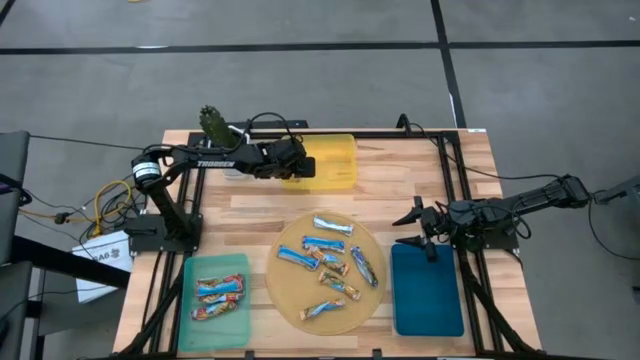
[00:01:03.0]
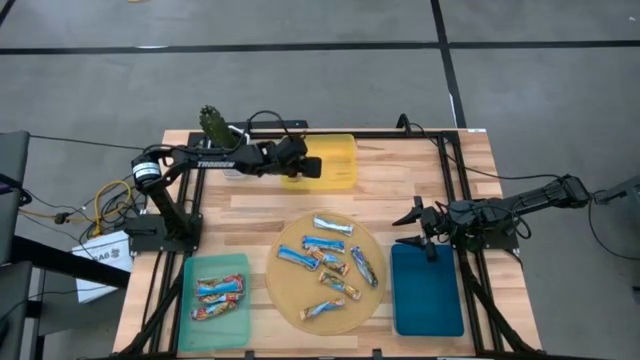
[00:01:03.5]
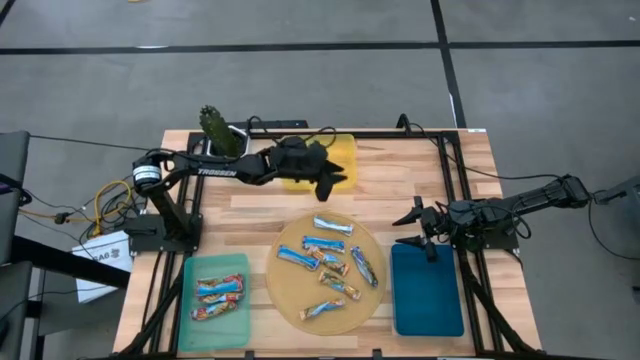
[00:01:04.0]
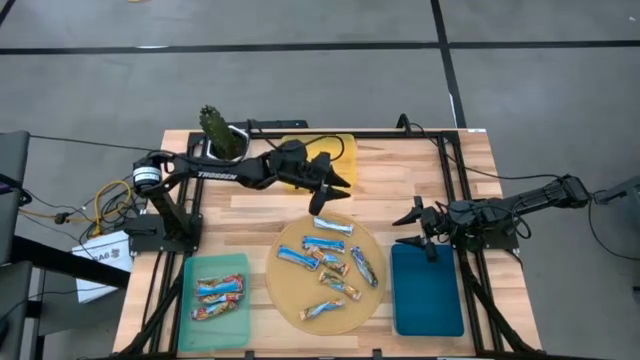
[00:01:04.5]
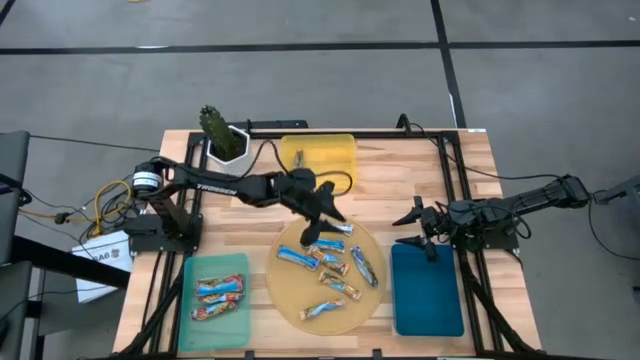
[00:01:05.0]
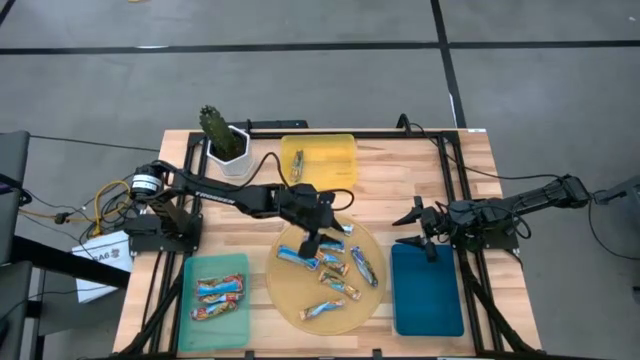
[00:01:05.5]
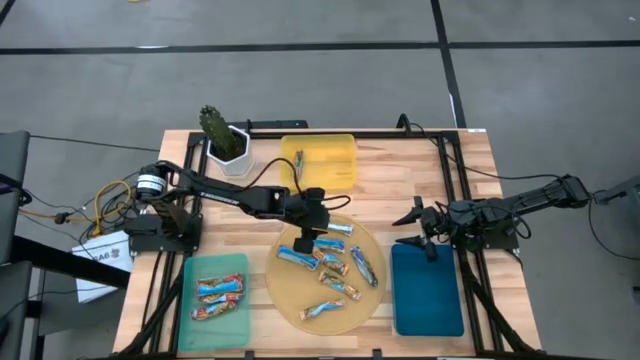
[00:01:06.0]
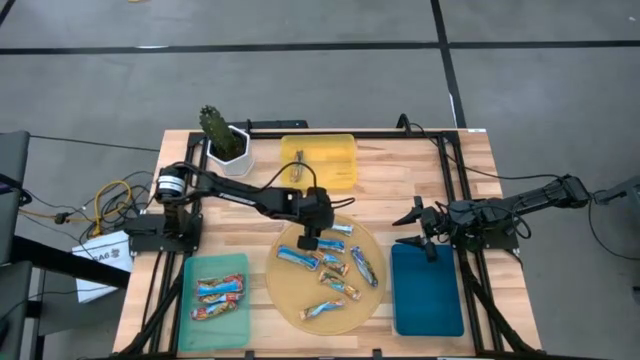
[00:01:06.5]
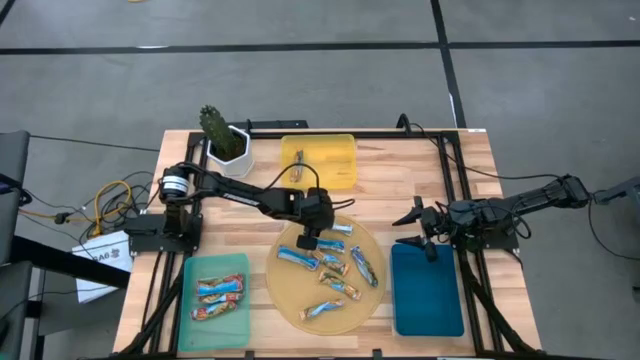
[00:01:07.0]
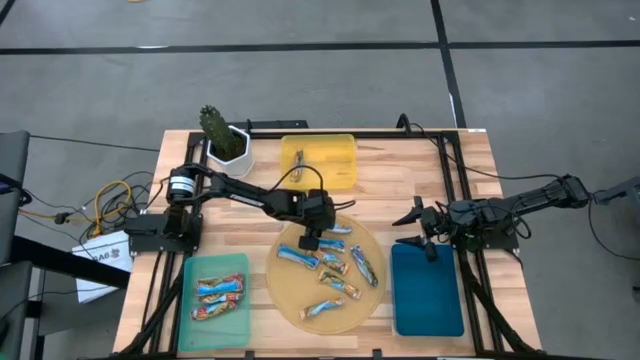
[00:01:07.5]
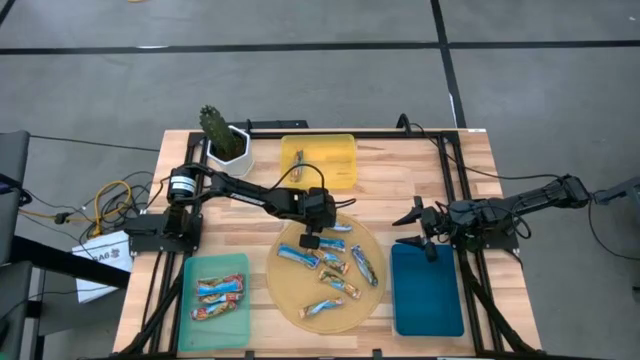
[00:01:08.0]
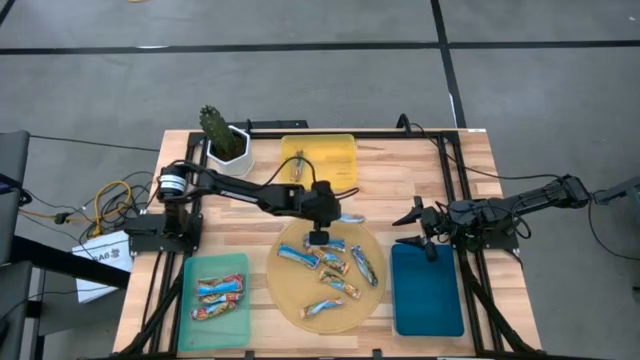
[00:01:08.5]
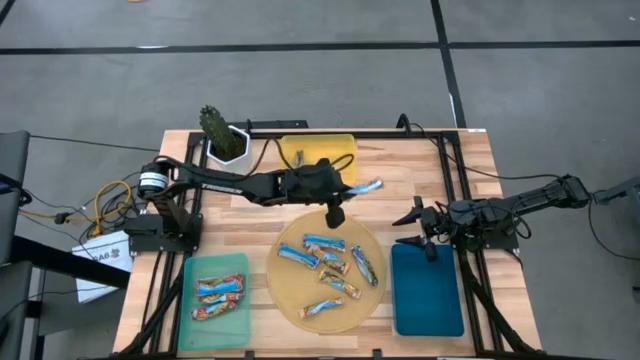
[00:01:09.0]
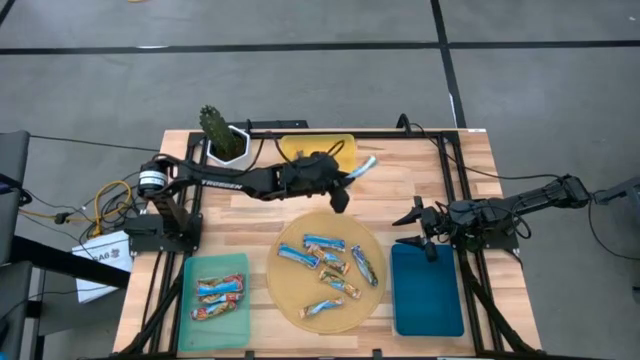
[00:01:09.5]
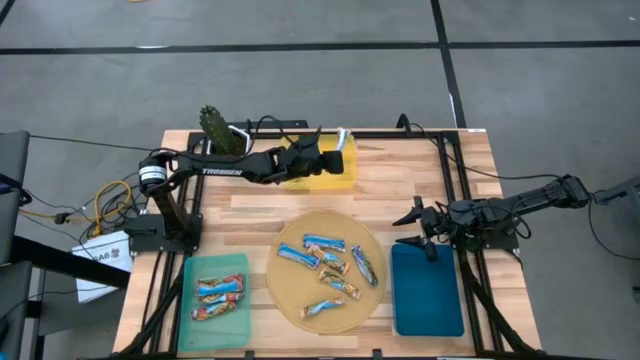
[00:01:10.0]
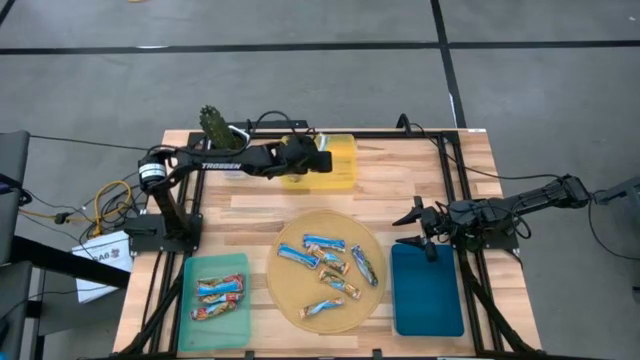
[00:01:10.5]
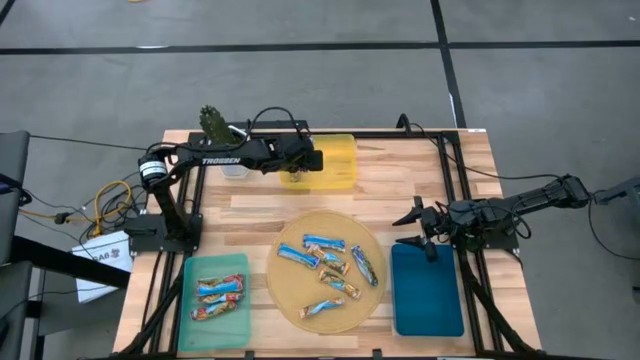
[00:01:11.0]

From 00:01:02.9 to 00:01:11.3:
Task: Pick and place Granola Bars by type
Put the yellow granola bar into the yellow bin

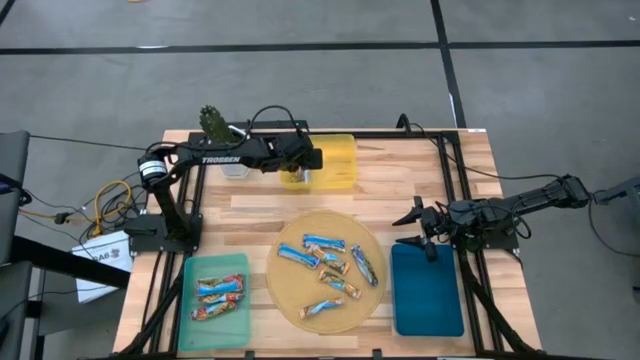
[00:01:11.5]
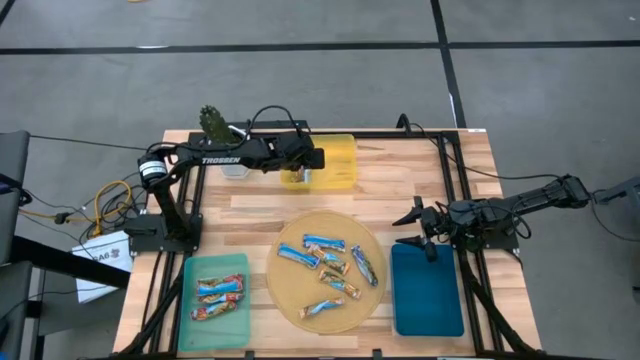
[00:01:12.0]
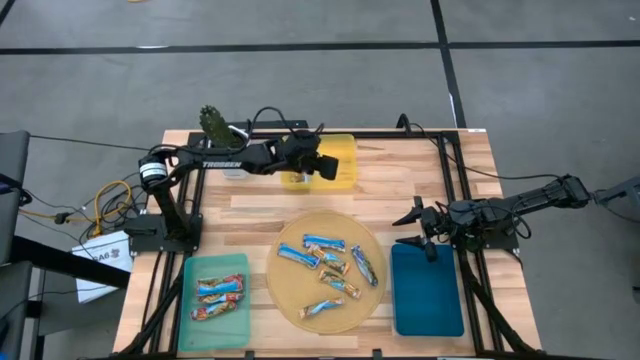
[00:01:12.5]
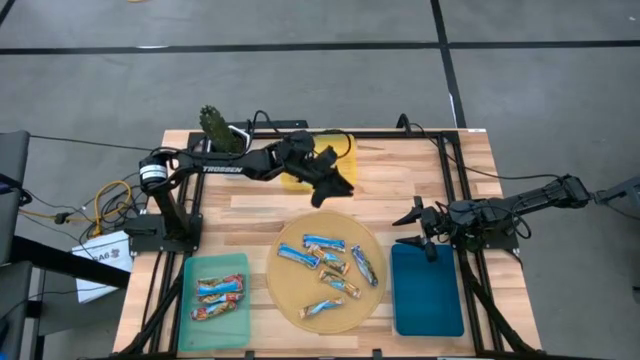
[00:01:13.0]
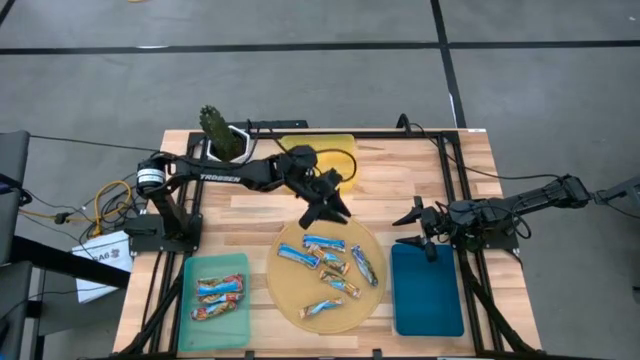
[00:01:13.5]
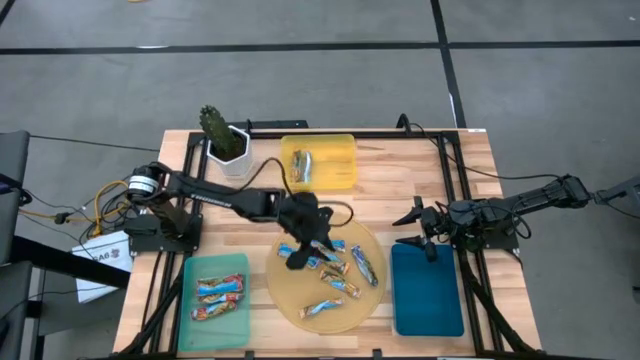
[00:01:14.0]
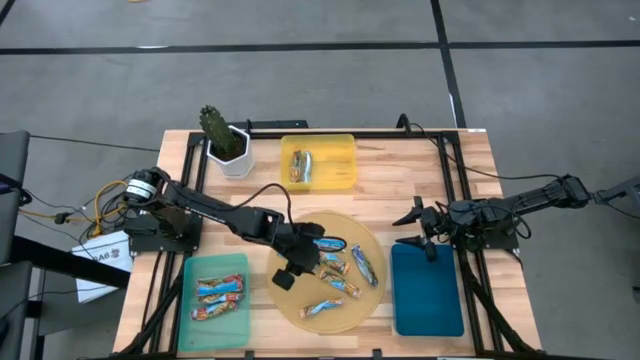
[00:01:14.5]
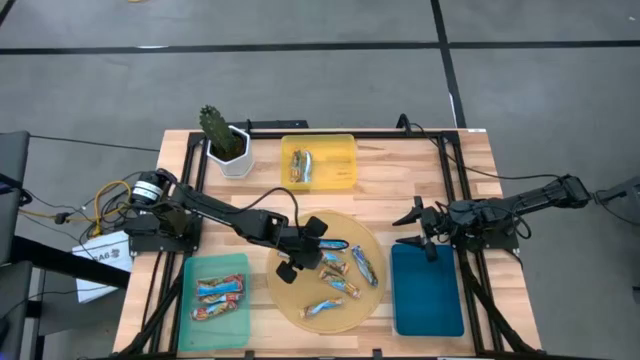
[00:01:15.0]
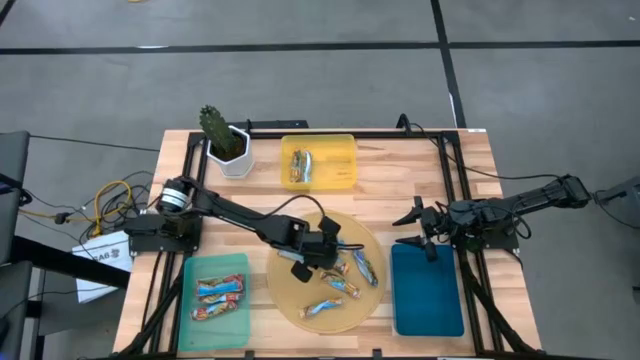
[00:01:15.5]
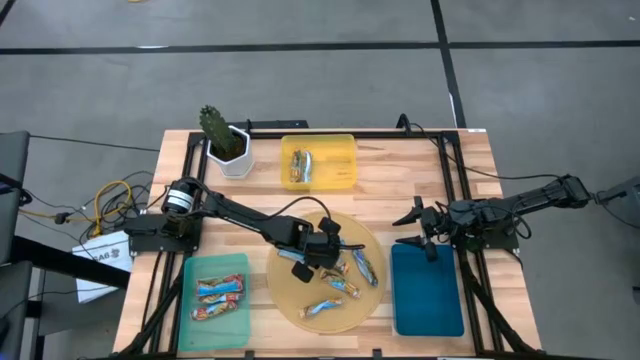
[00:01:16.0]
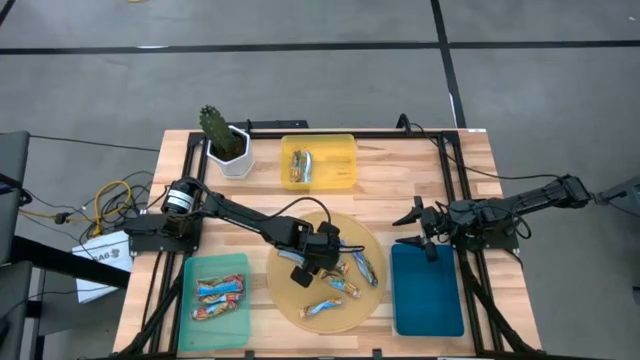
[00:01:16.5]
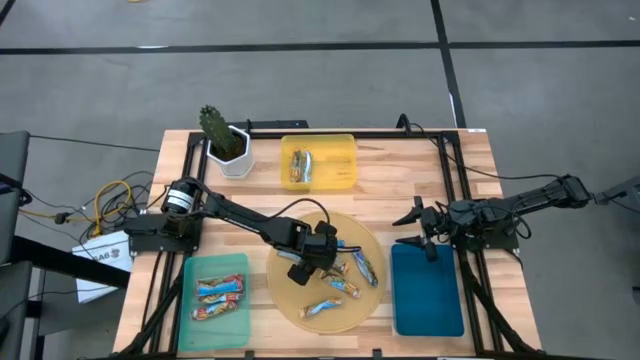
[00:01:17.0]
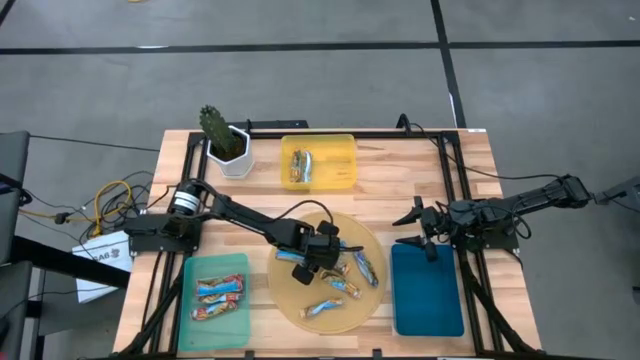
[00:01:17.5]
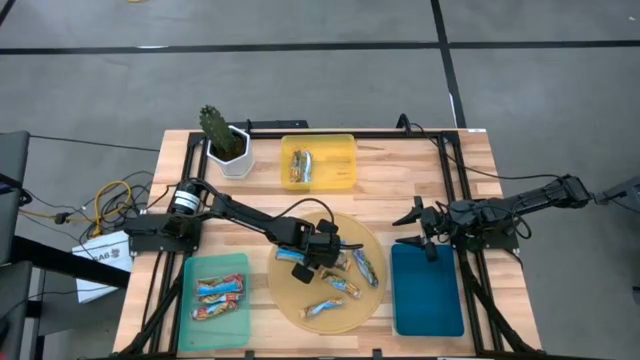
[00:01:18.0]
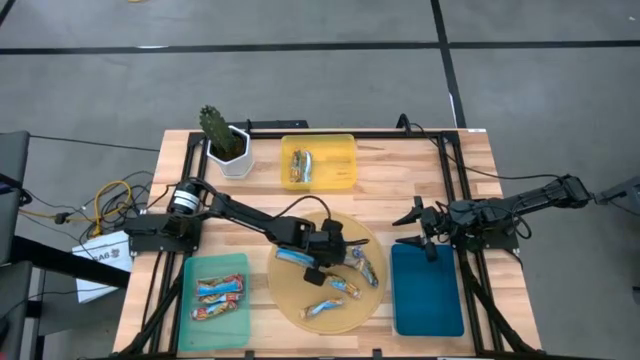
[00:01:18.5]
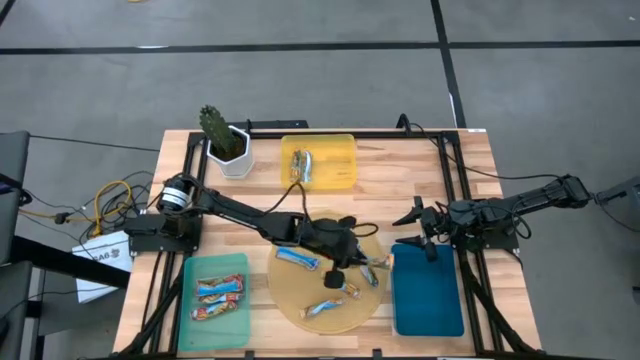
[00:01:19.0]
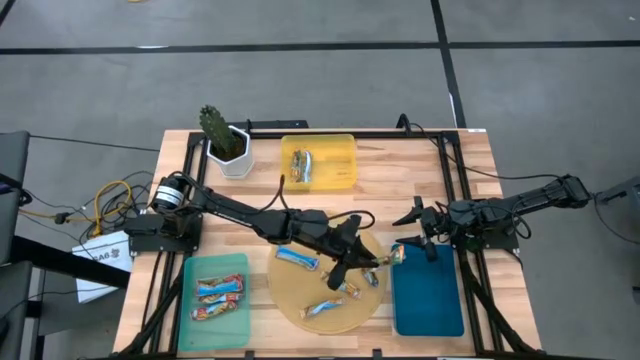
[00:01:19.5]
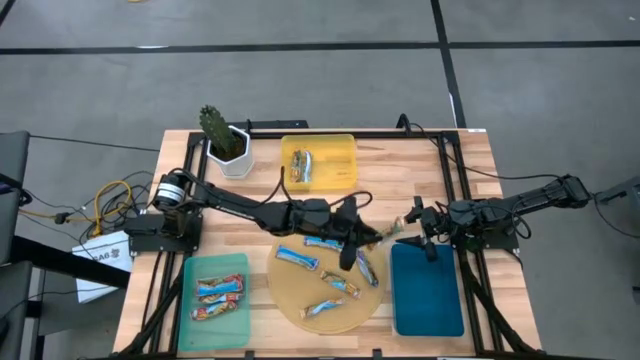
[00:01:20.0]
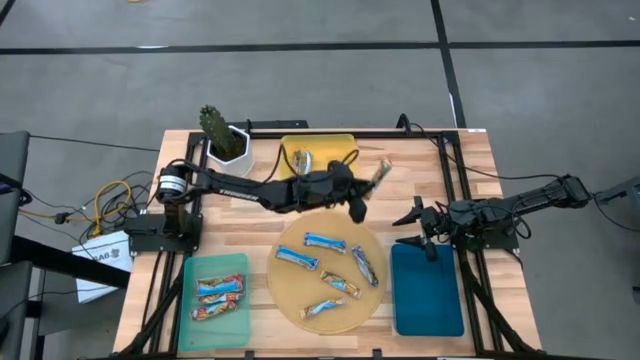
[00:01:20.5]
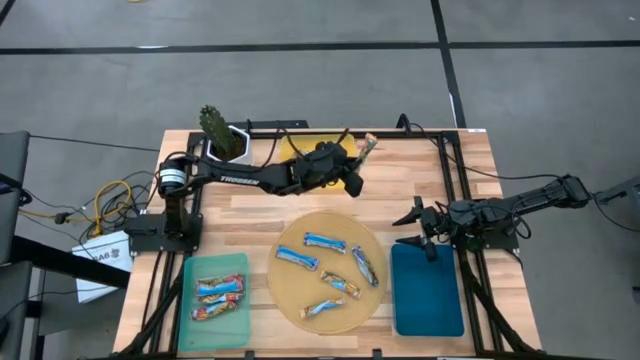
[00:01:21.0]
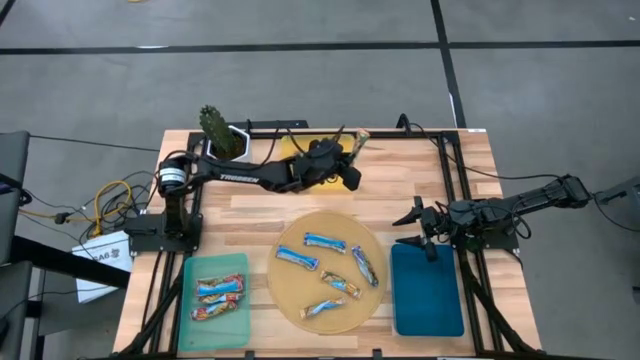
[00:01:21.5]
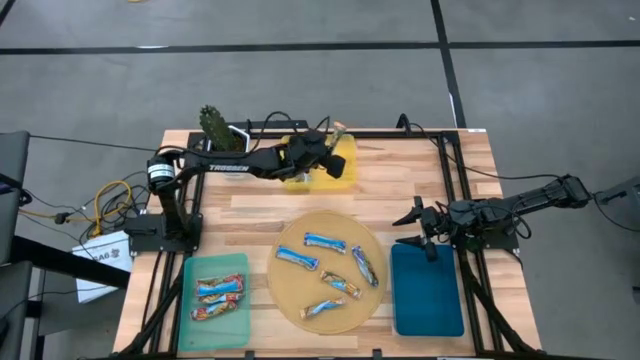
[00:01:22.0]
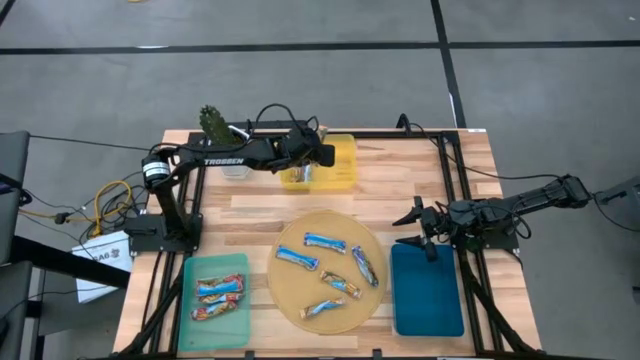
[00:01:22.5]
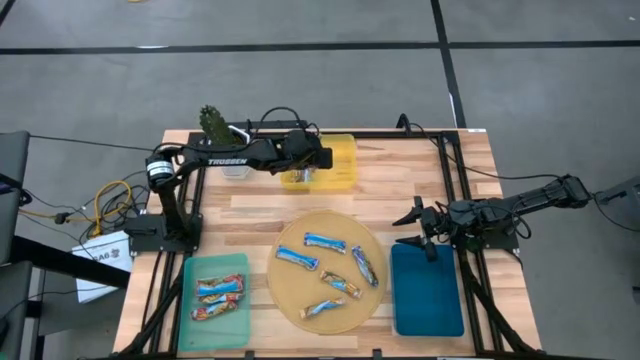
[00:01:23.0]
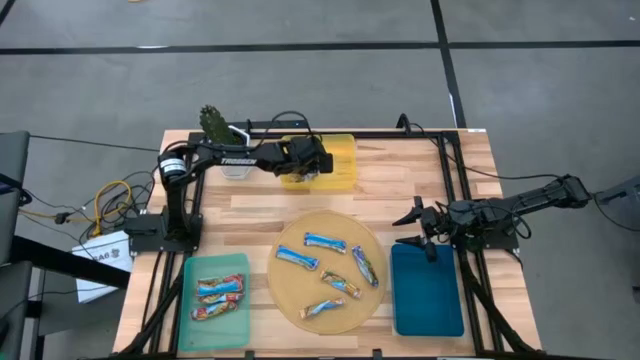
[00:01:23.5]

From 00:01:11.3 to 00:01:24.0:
Put the yellow granola bar into the yellow bin
